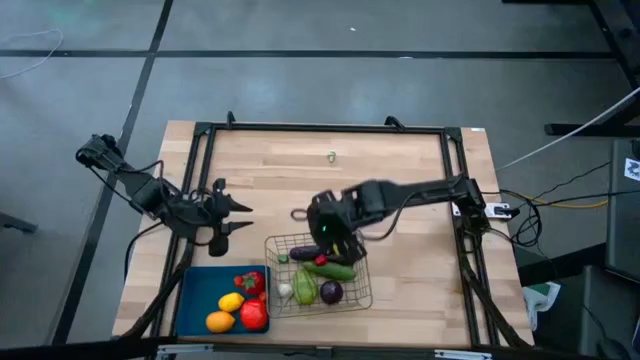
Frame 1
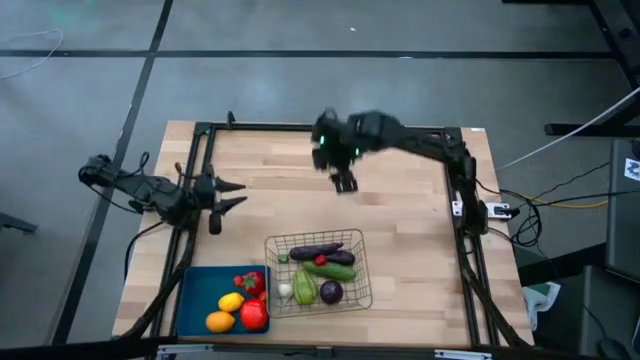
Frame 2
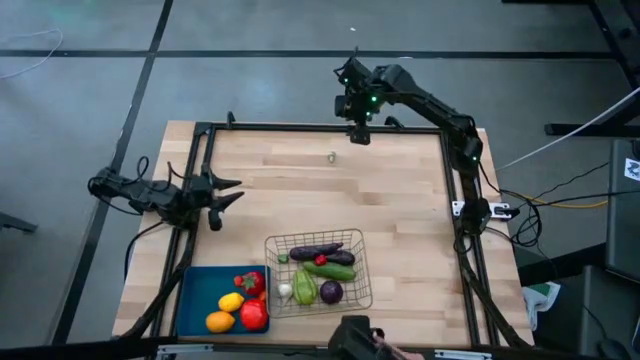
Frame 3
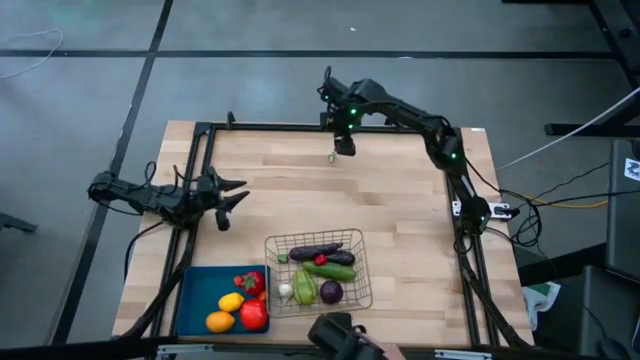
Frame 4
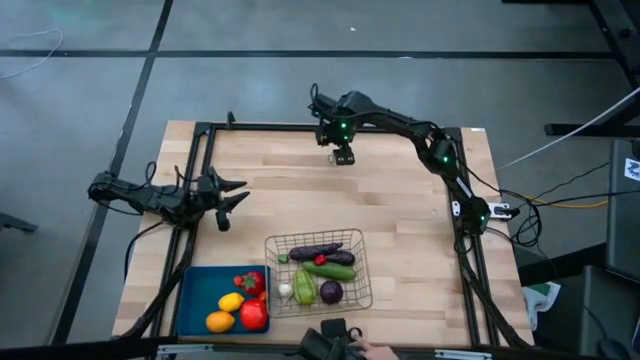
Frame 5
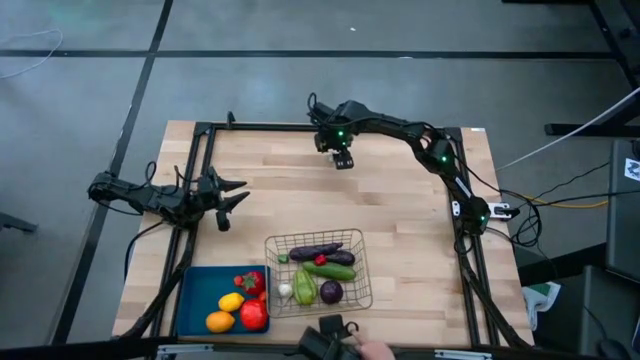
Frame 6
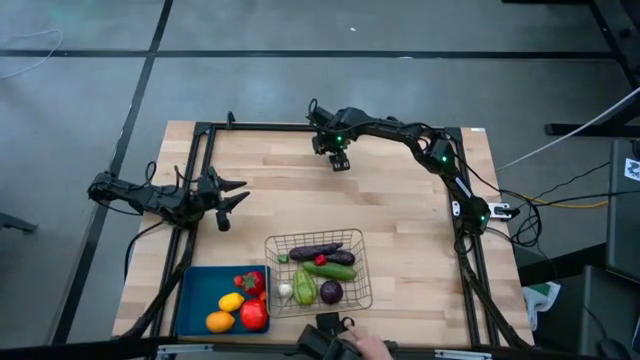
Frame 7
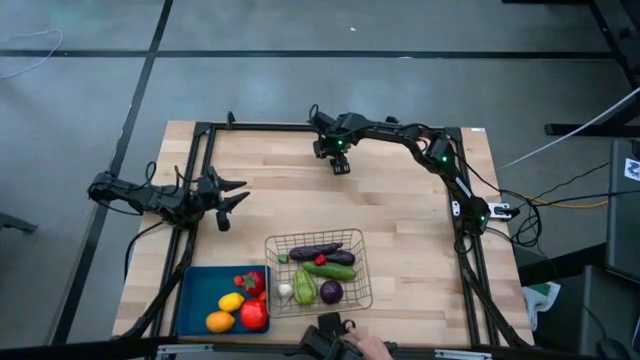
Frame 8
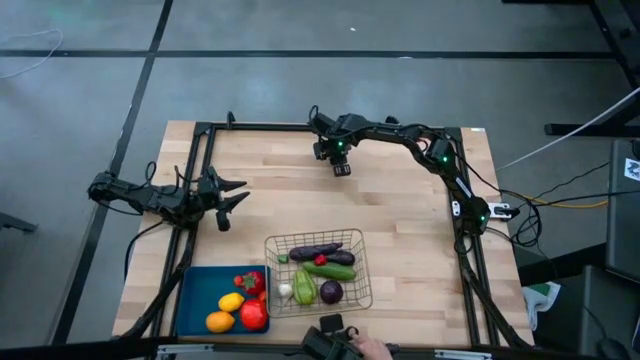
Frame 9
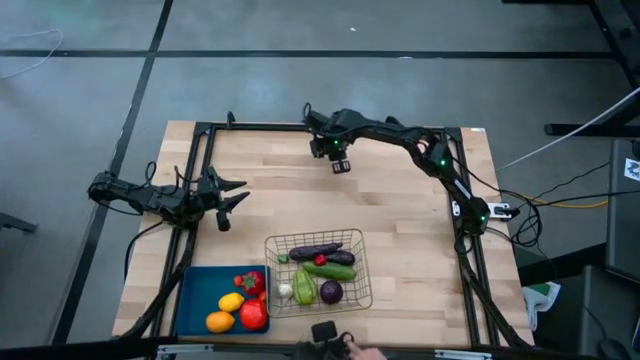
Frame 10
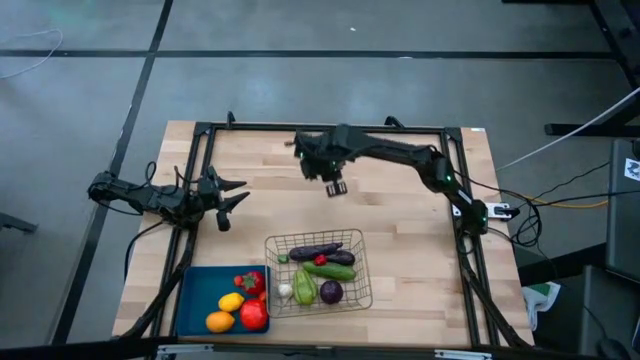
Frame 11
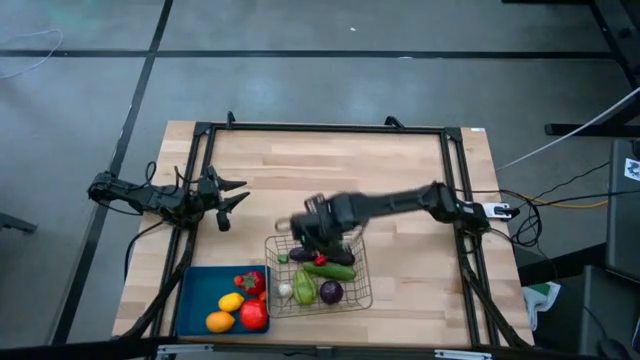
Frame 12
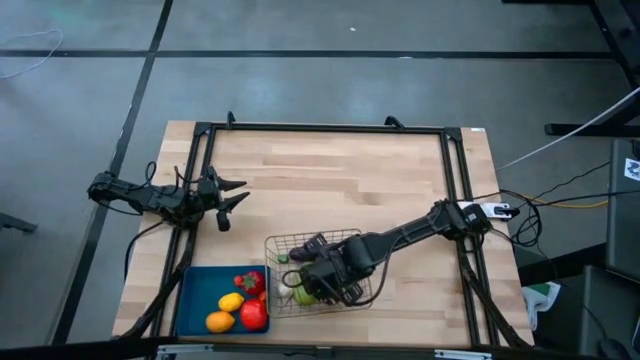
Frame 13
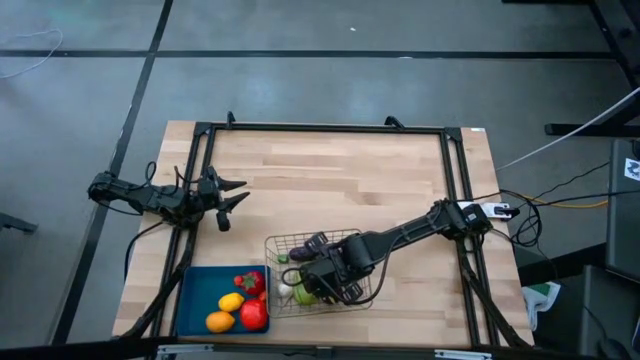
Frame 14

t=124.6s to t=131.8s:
Task: Sort produce into baskets
Put the green mushroom into the gold wire basket

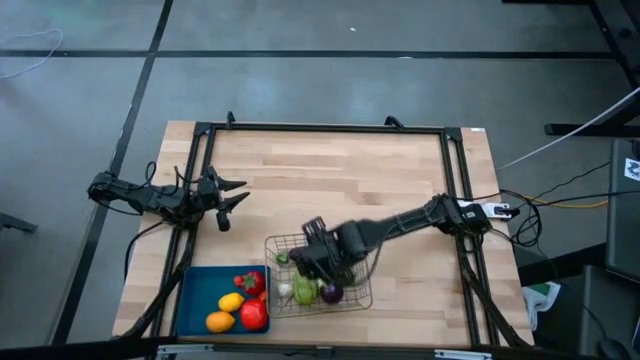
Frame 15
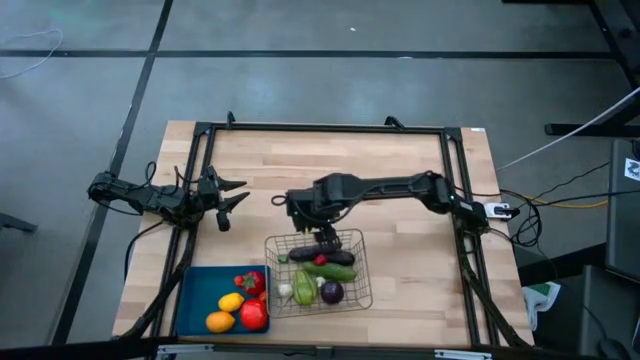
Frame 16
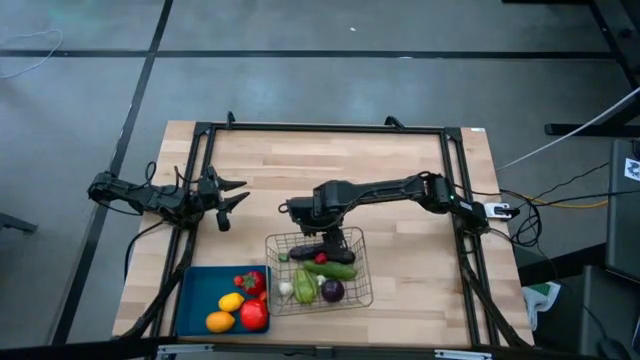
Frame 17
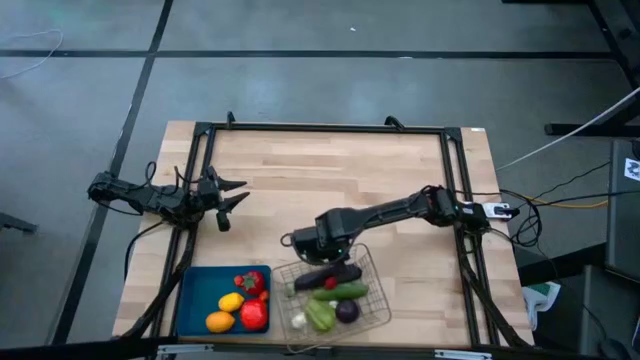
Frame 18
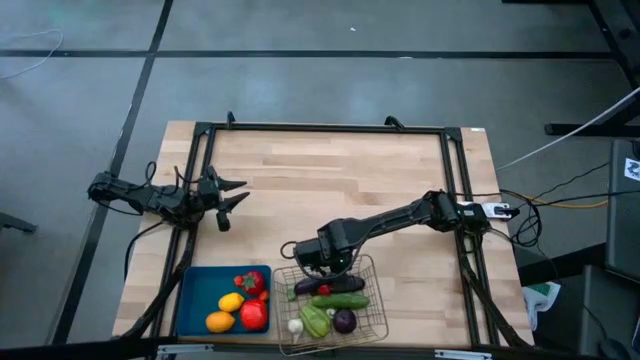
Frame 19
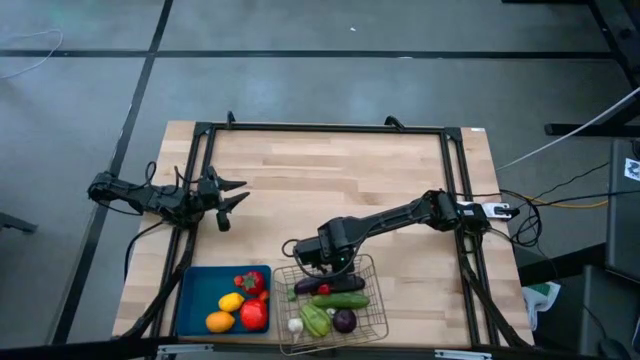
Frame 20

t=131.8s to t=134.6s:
Adjust the gold wire basket

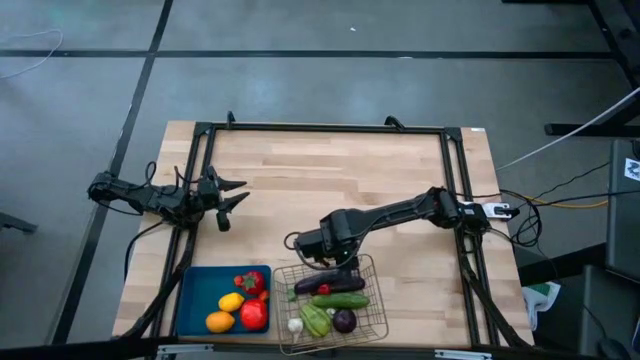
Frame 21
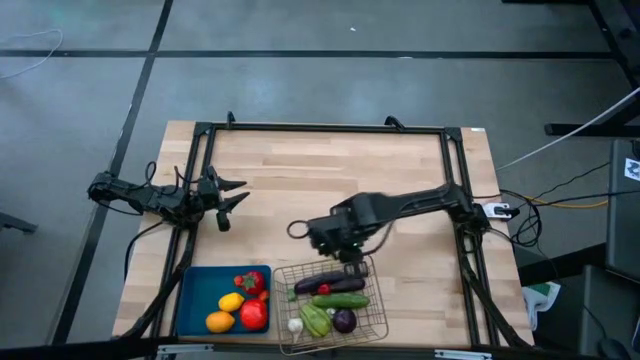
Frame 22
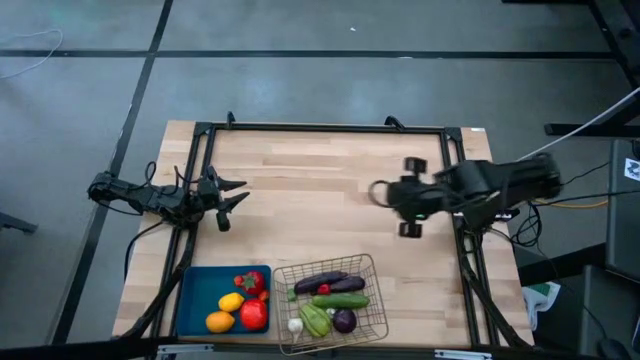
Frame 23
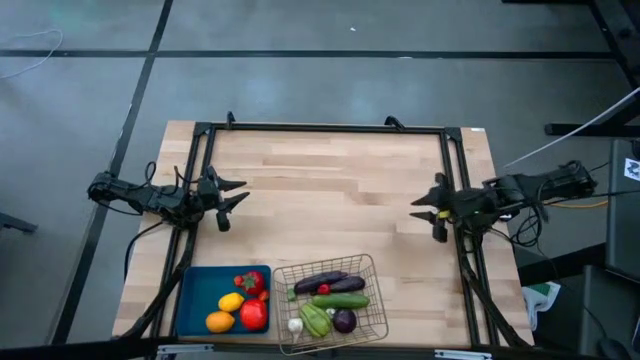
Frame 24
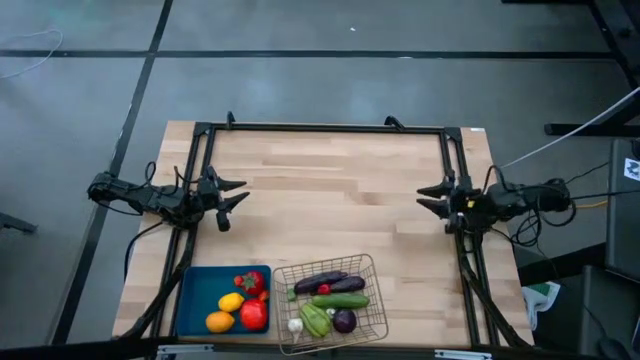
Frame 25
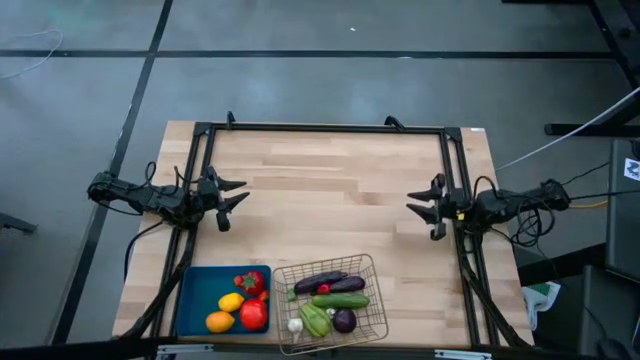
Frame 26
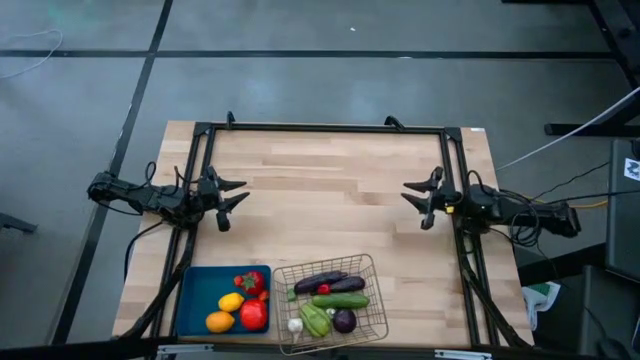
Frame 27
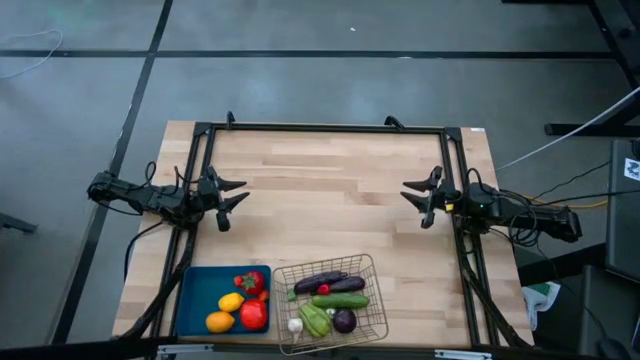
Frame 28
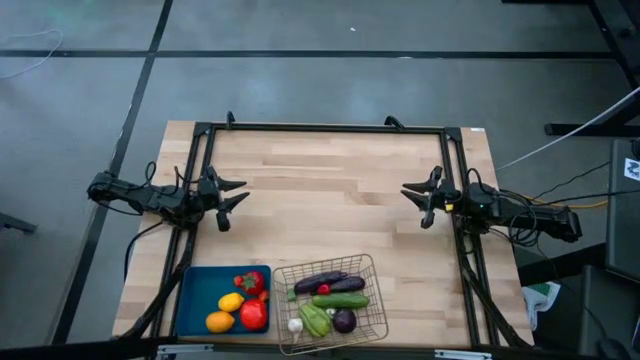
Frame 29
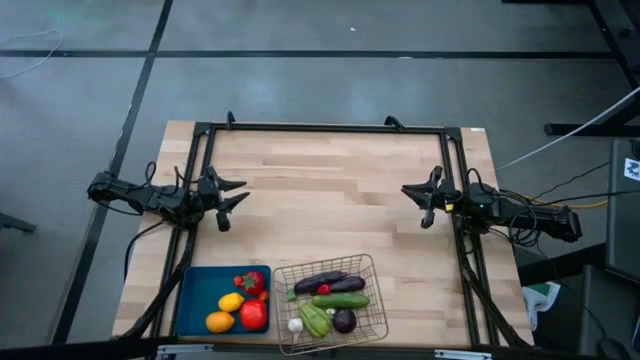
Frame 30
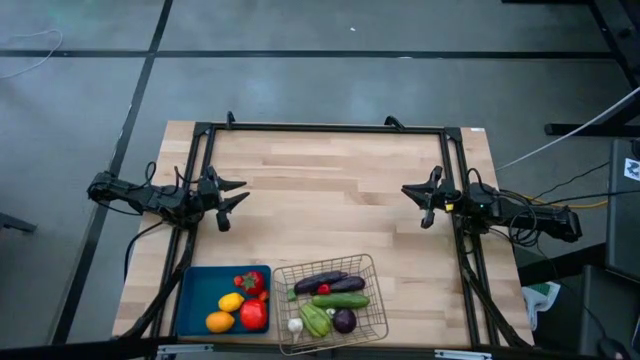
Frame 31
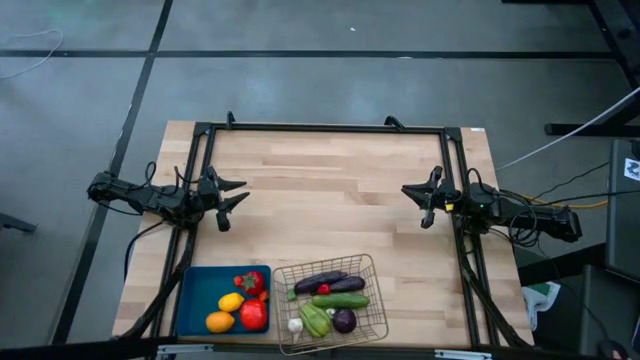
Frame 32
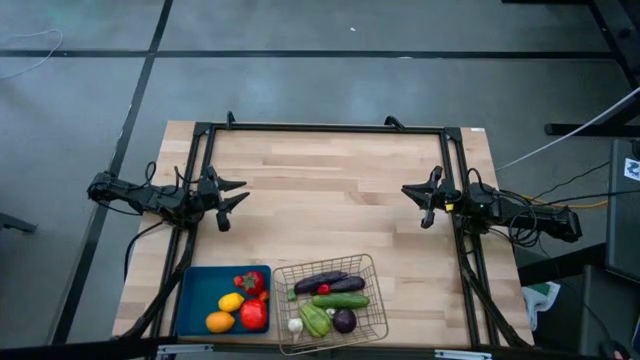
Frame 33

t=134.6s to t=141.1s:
Return to Home Position

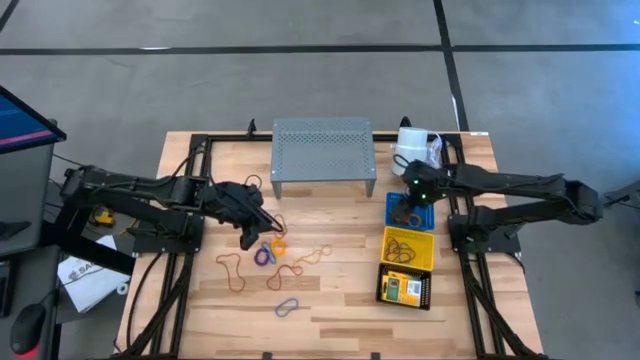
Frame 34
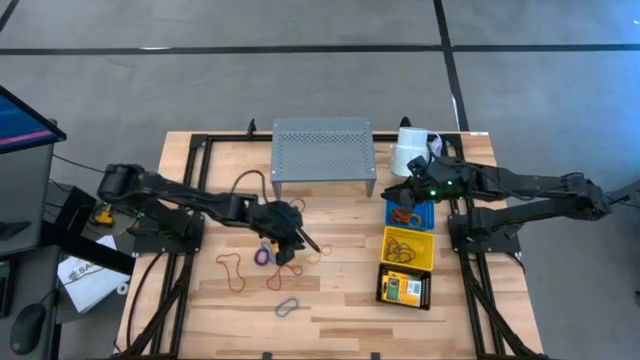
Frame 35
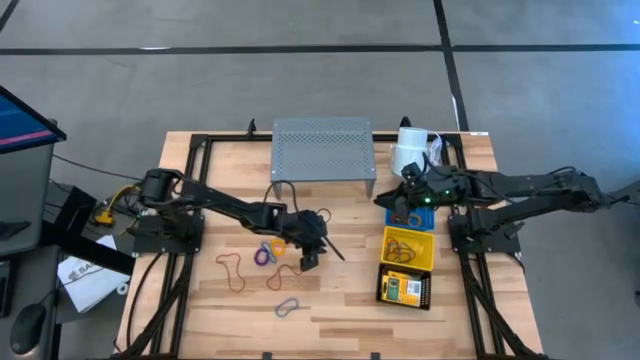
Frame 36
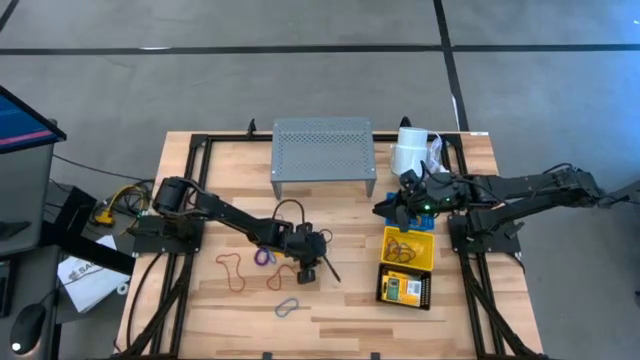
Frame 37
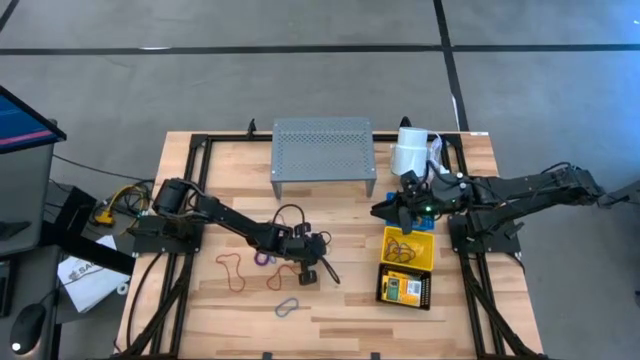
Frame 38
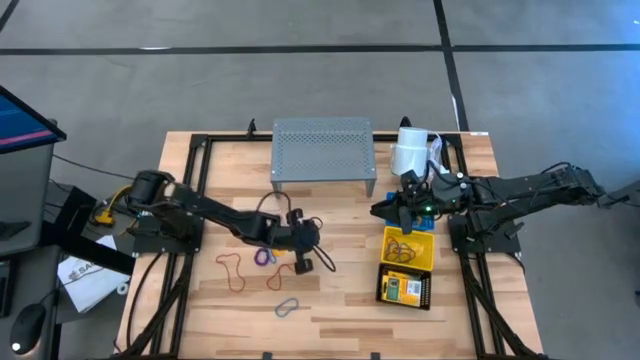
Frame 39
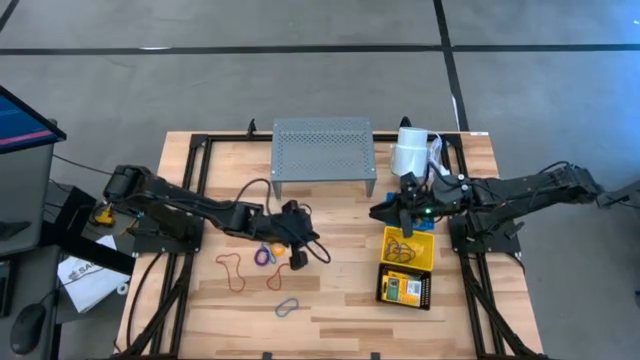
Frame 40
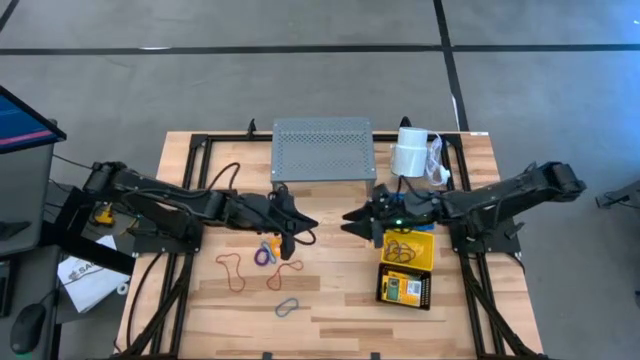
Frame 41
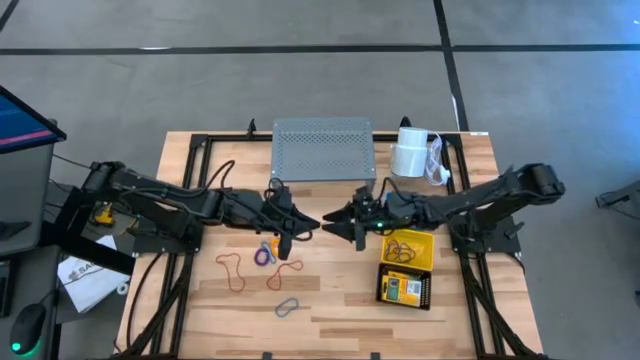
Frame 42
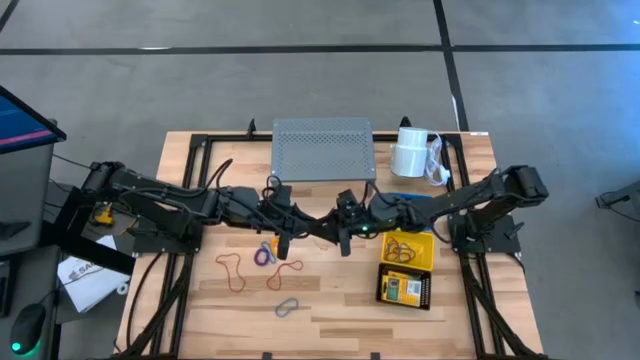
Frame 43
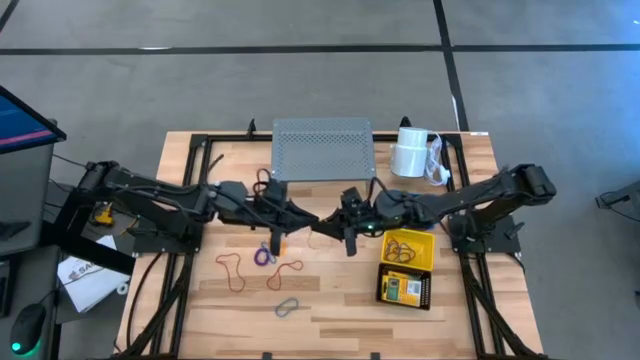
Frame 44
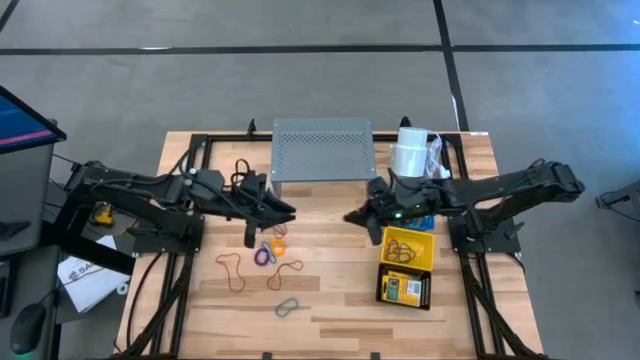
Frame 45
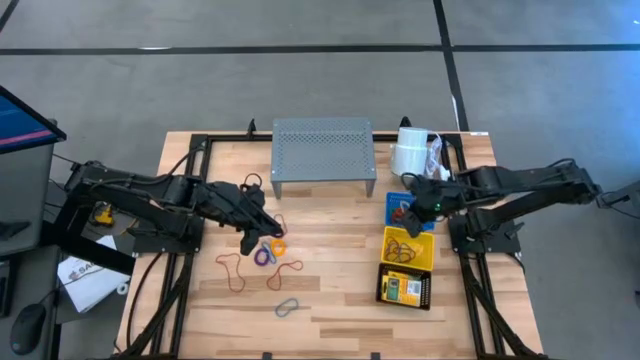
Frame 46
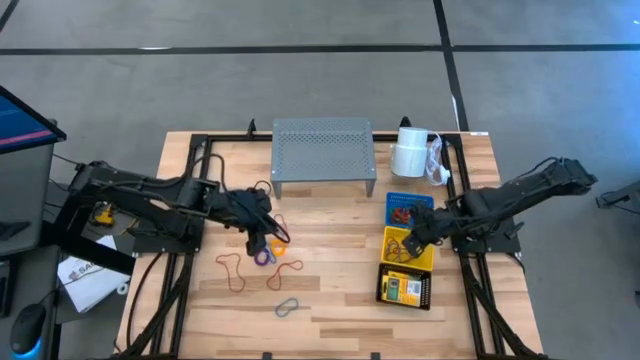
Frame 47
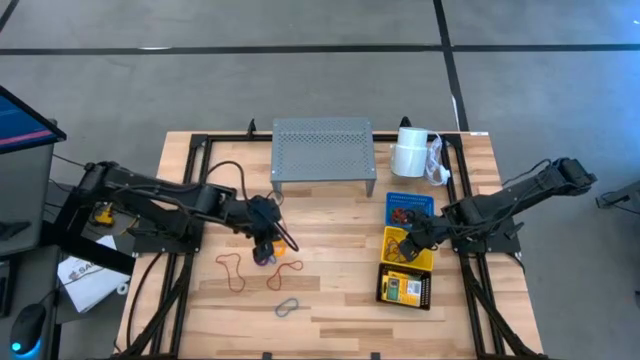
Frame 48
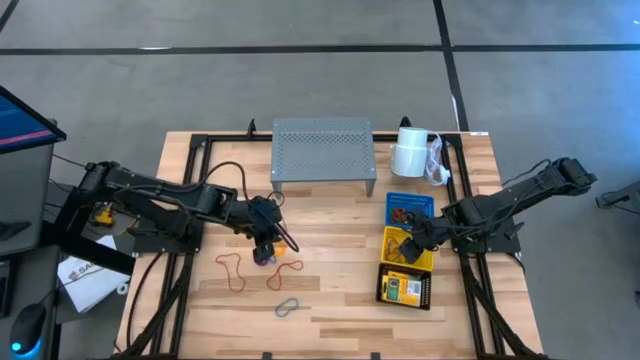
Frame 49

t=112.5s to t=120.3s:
Task: Pick & Place Office Desk Supplies
Put the yellow rubber band into the yellow basket
